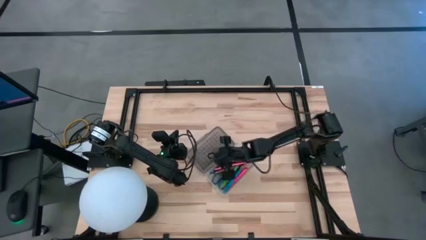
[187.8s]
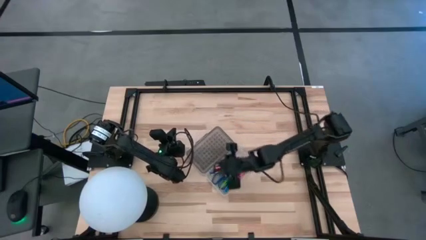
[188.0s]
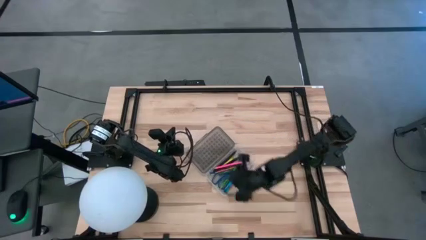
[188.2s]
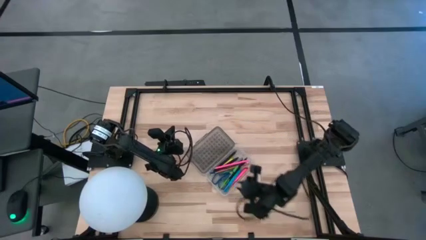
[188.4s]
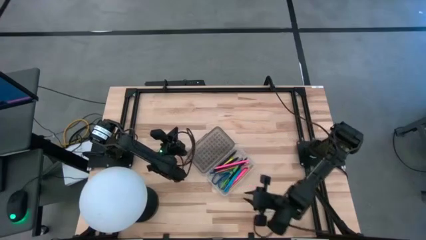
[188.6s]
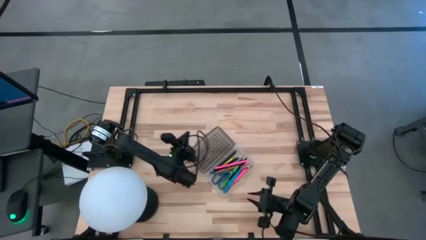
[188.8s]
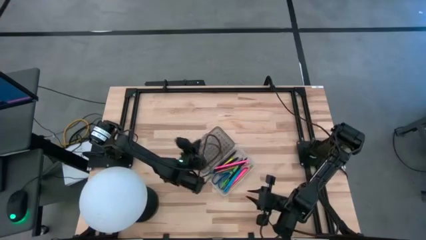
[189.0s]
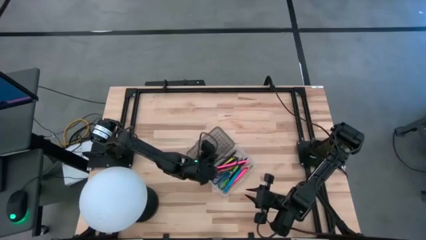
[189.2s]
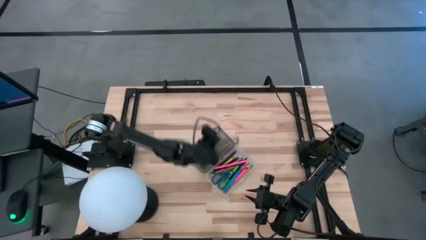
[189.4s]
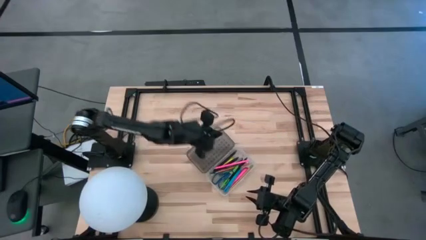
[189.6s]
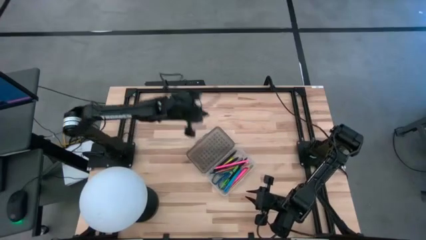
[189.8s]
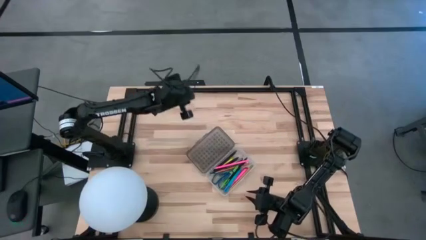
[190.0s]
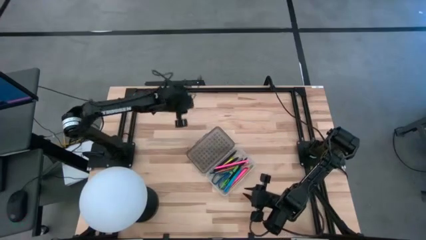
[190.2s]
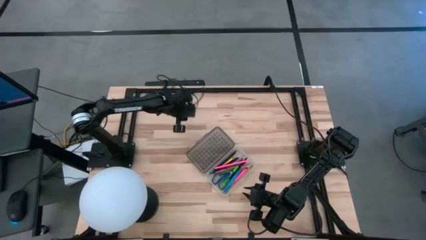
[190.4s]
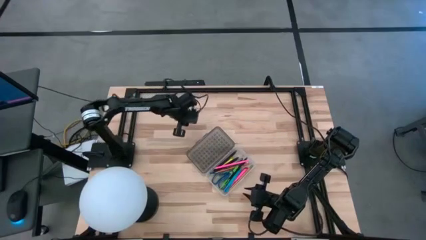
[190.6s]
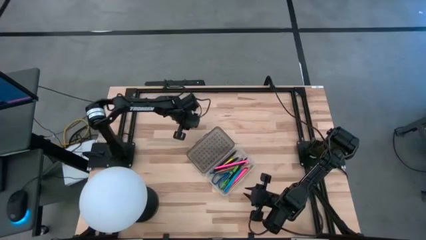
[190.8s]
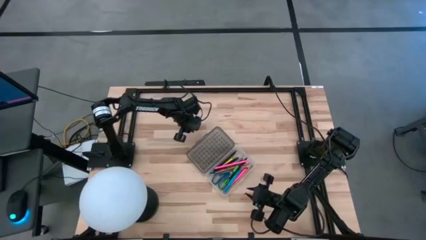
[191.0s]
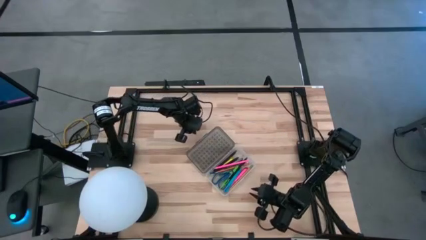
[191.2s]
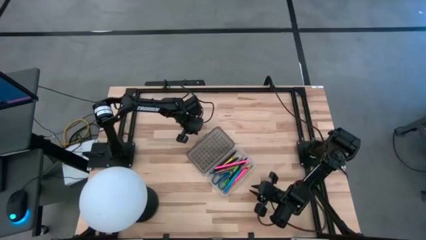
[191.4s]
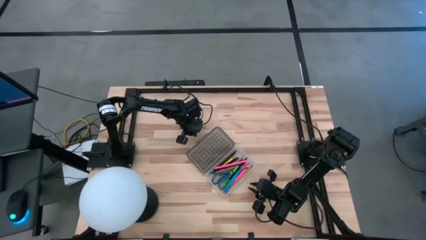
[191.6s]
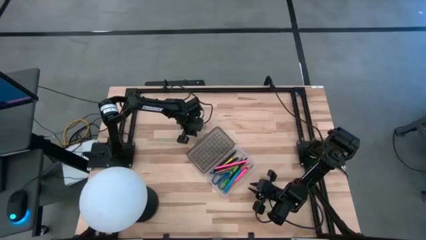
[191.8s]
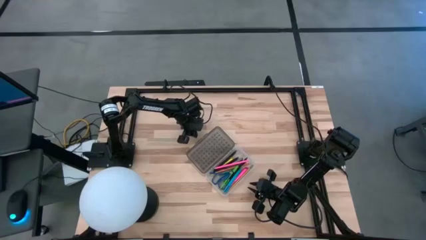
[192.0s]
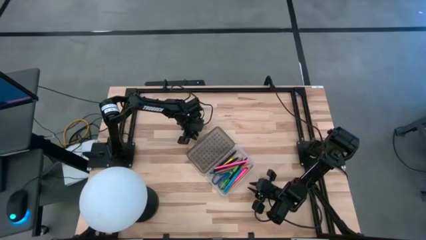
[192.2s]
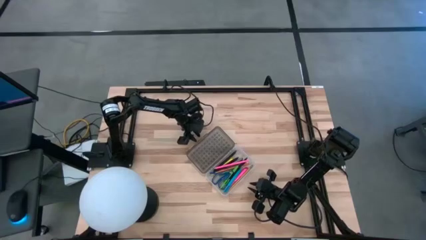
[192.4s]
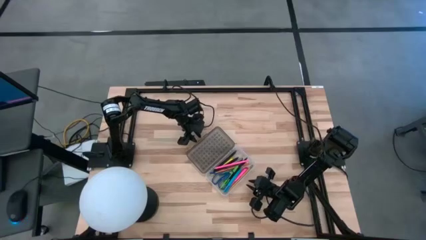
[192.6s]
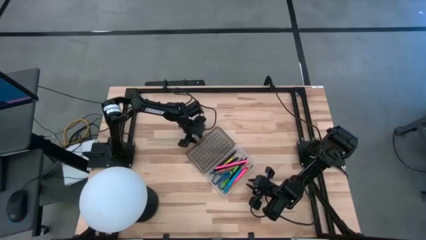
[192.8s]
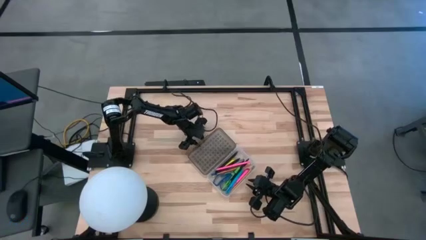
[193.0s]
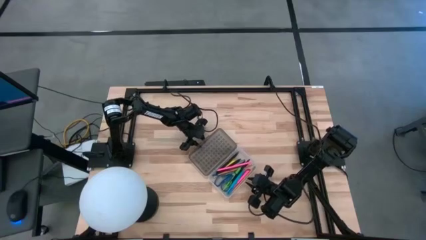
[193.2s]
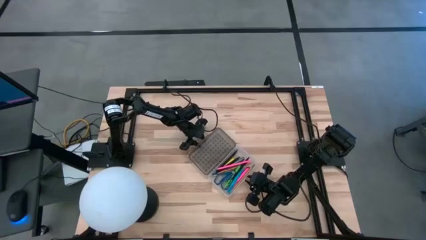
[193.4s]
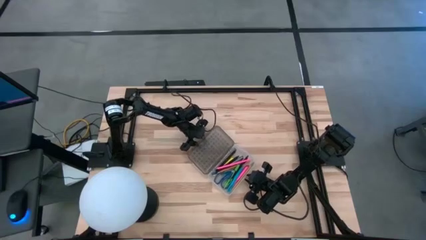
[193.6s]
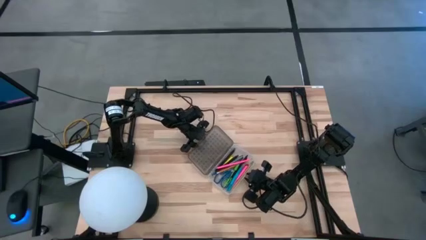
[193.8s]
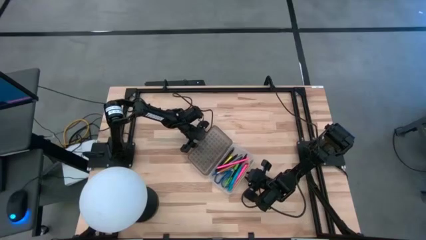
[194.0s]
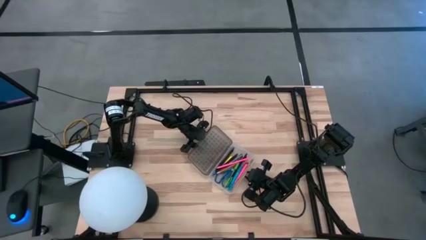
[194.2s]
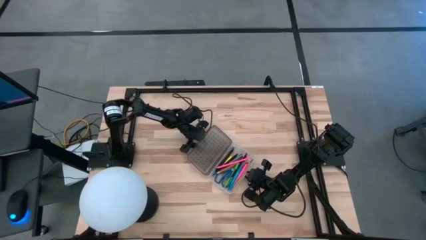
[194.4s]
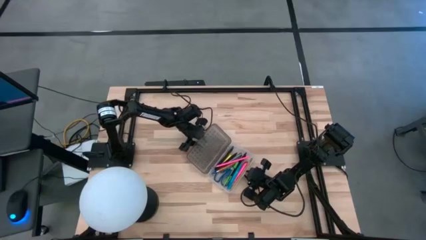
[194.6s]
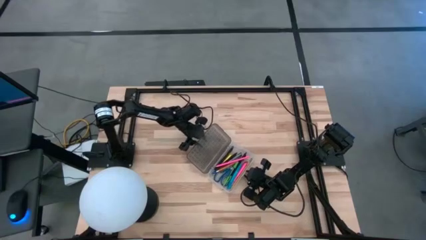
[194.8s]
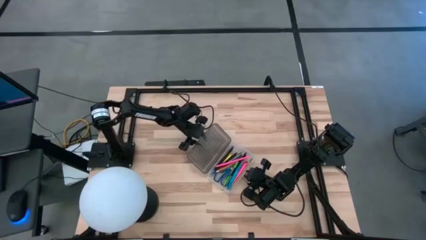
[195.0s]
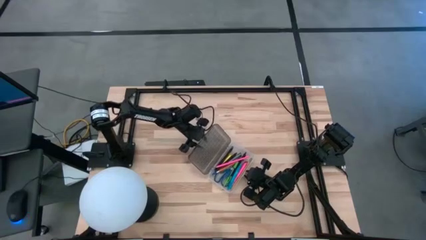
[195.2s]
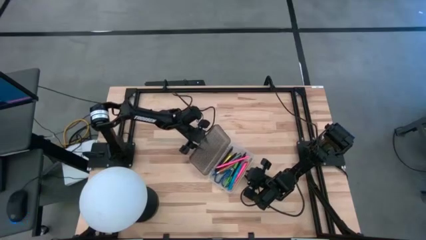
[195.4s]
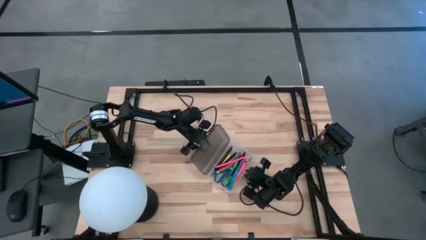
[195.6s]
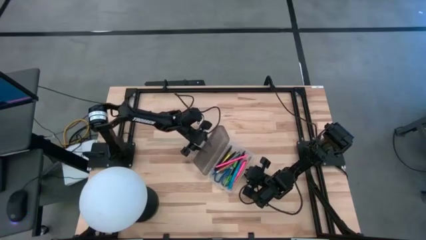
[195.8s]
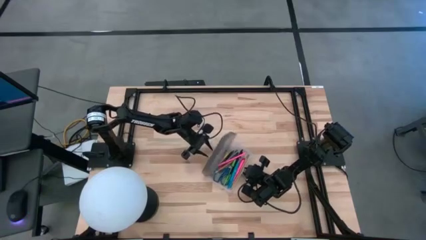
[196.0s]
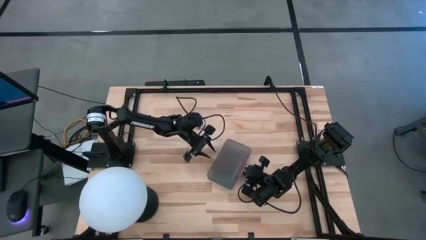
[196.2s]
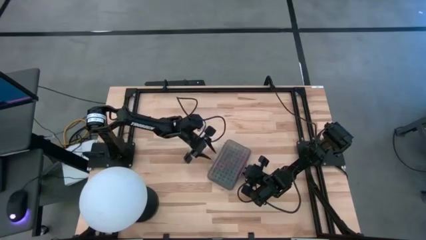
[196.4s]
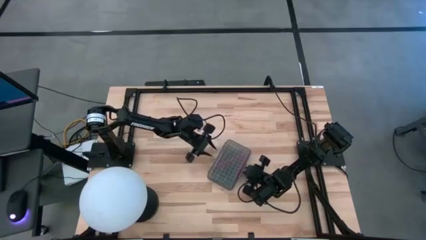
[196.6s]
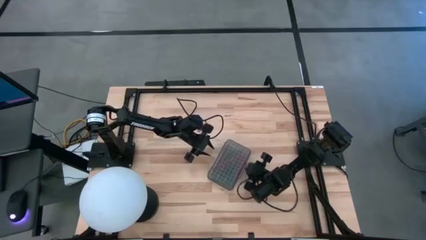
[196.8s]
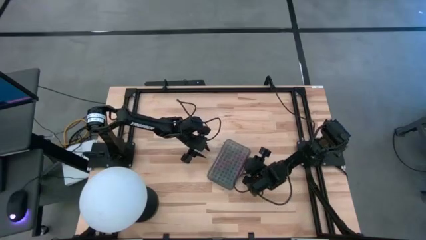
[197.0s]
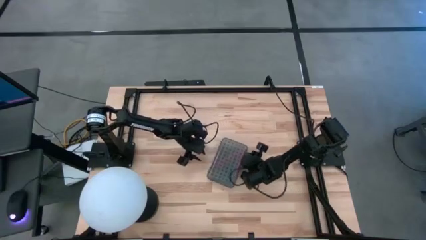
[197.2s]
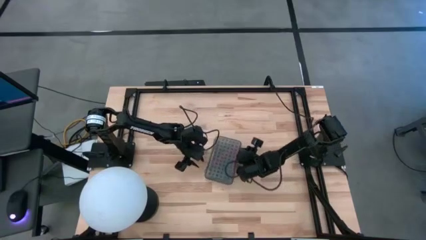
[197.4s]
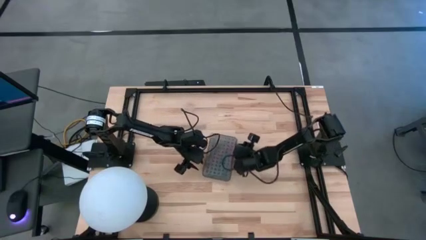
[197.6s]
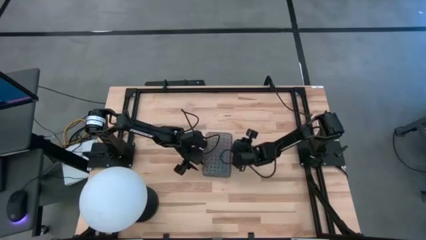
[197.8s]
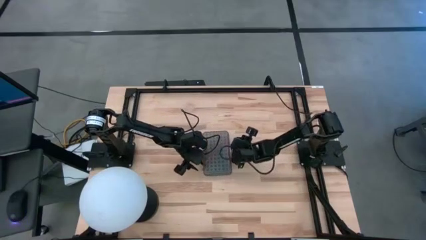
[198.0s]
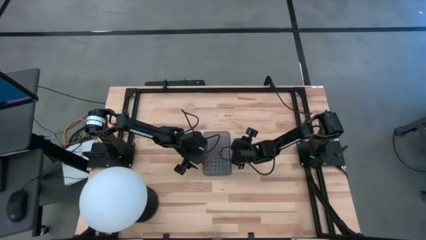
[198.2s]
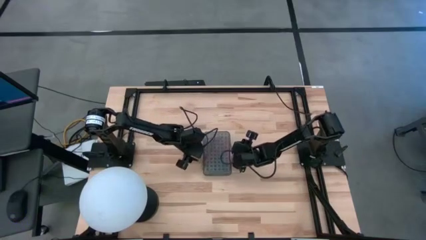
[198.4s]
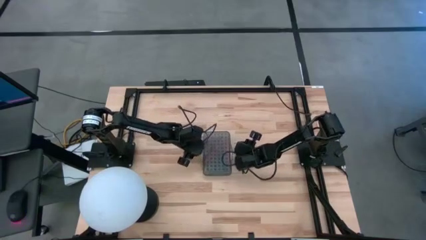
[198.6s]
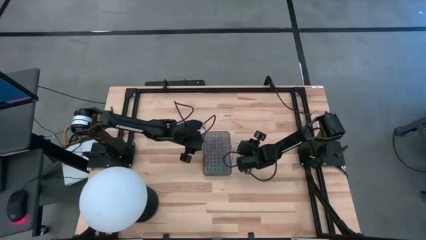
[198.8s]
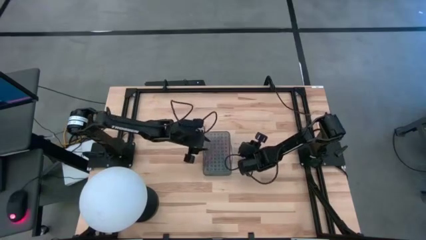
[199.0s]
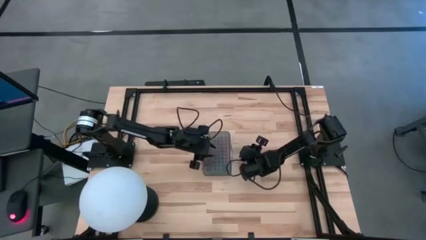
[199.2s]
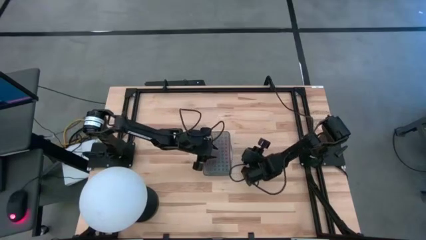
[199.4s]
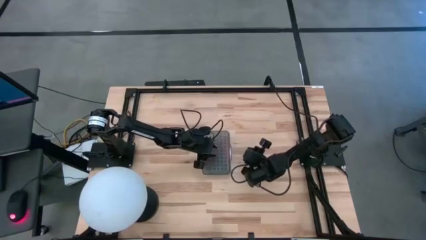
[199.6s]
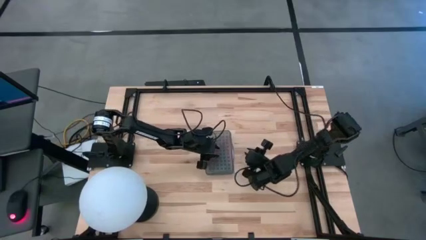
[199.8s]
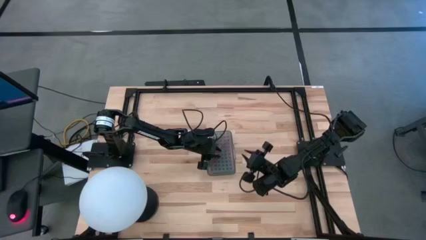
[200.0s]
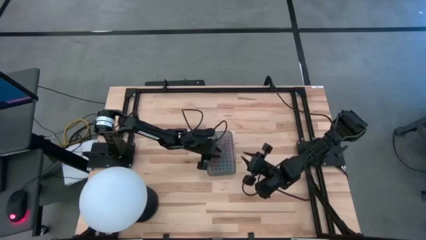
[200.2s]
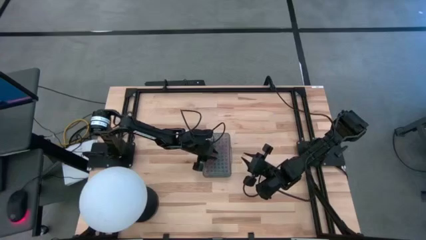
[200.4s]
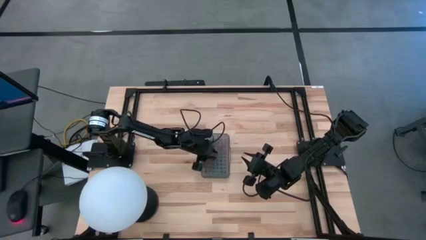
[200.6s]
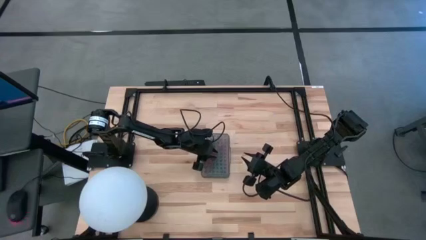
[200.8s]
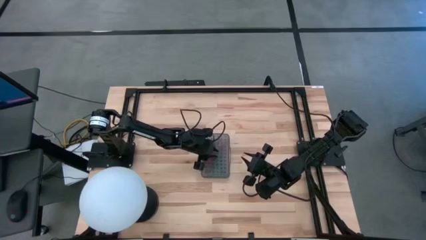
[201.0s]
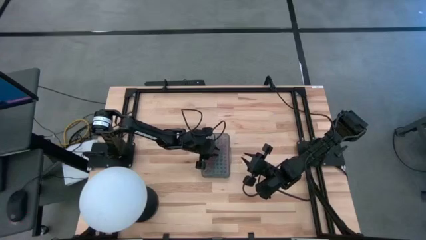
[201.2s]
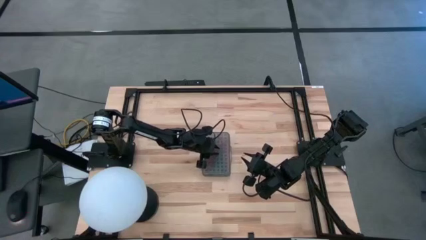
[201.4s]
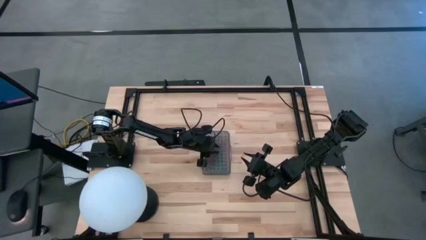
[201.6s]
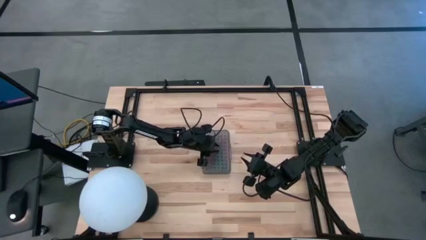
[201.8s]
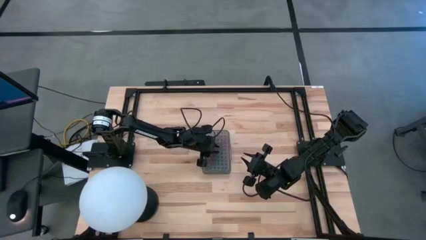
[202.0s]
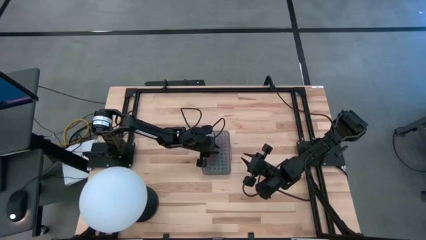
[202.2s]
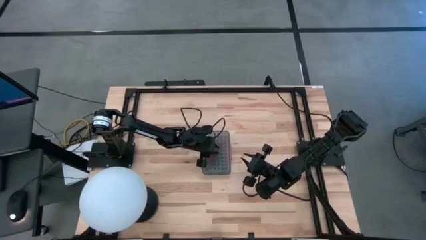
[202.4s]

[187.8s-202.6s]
Task: Pick & place school supplies into a supply box
Close the supply box

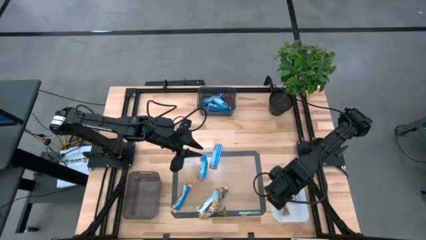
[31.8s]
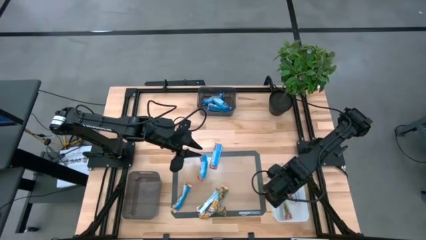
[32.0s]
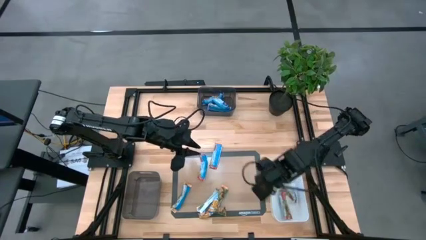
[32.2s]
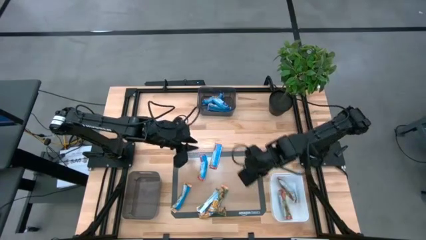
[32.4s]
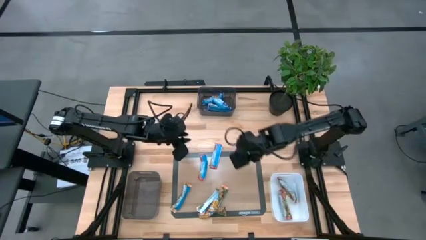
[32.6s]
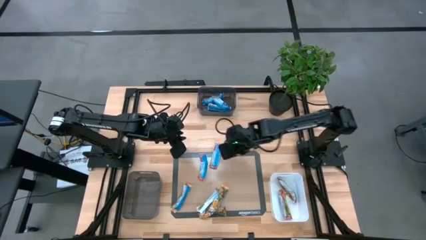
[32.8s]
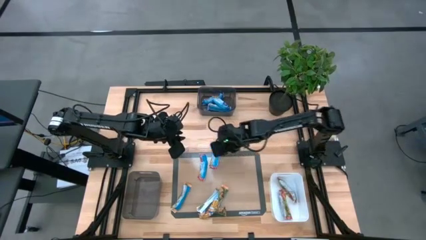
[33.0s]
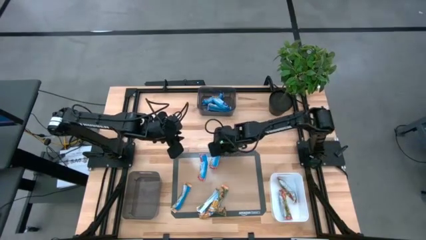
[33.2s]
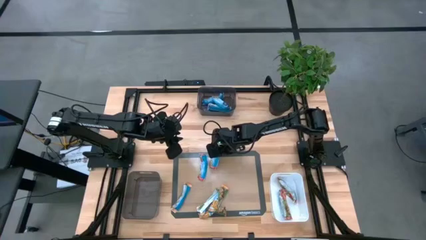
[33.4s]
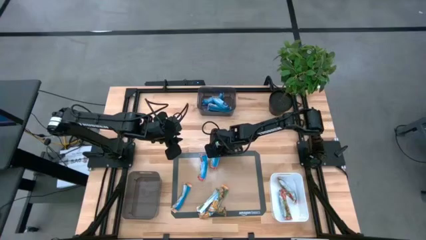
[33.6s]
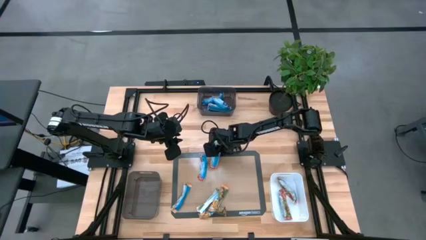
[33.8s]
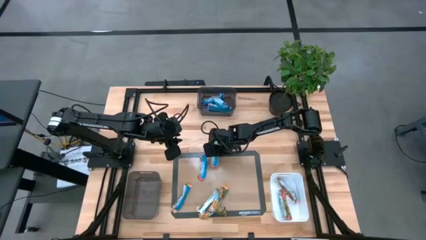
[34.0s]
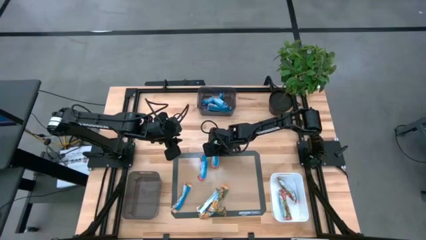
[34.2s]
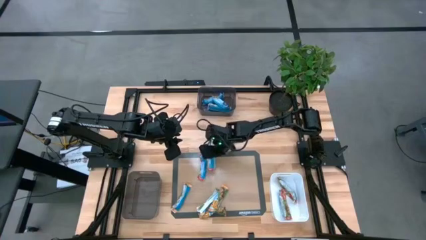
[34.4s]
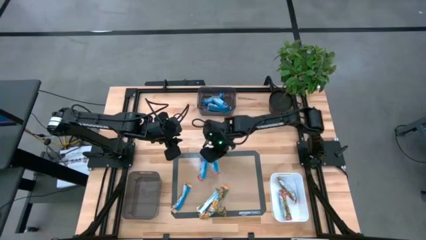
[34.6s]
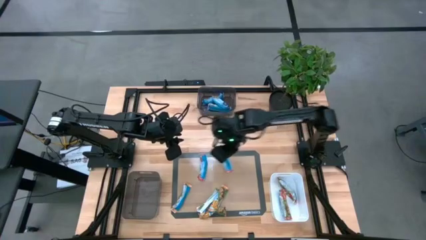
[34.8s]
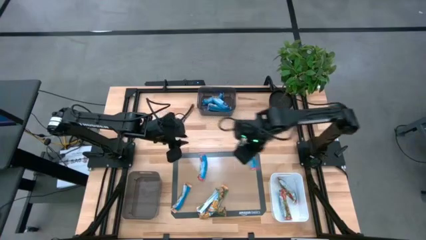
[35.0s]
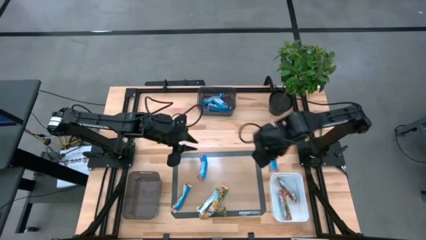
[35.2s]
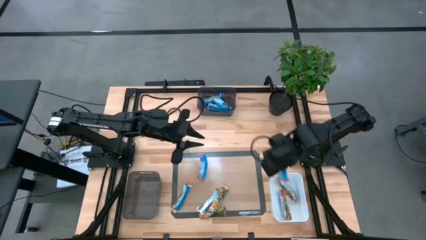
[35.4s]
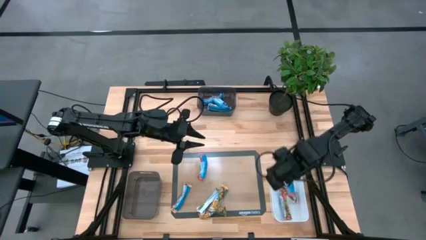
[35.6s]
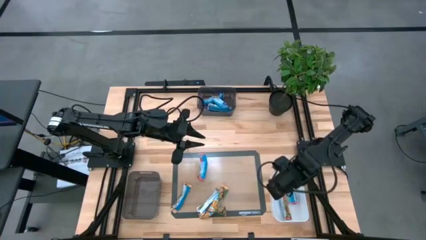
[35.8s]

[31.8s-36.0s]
Task: Pick and place Granola Bars by type
Put the red granola bar into the white bin
